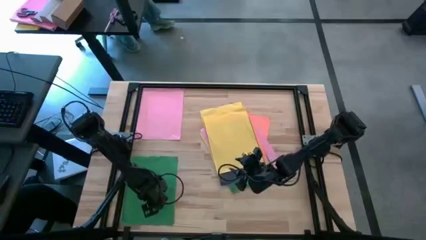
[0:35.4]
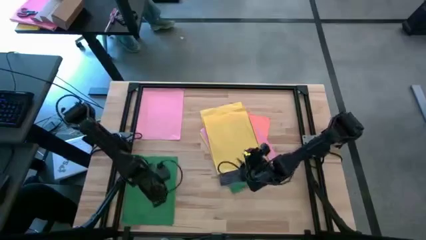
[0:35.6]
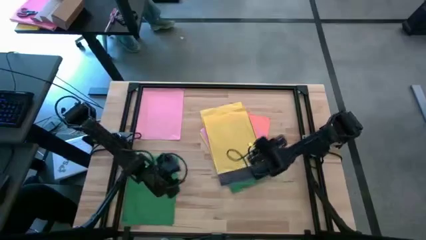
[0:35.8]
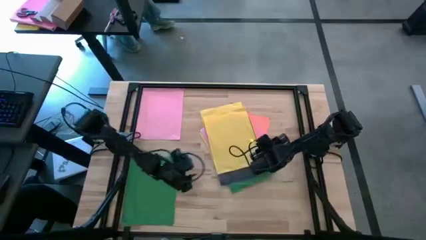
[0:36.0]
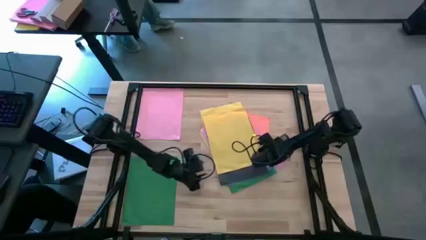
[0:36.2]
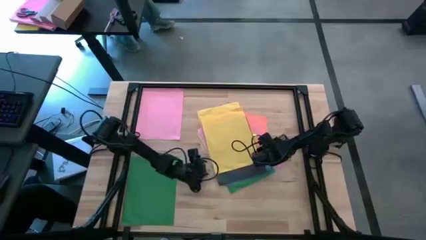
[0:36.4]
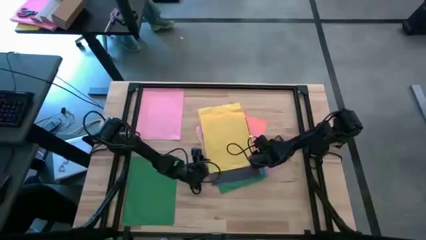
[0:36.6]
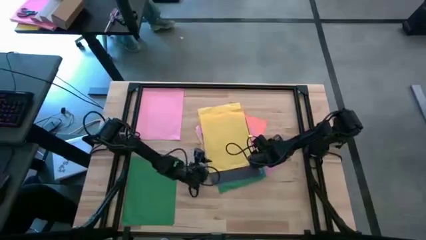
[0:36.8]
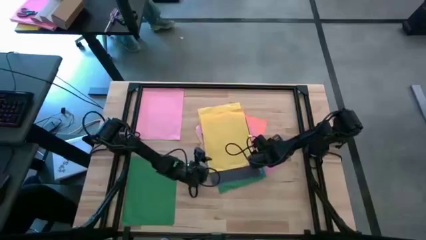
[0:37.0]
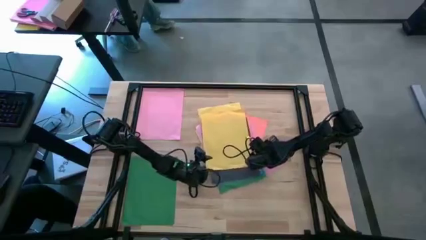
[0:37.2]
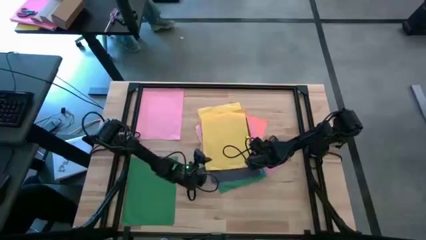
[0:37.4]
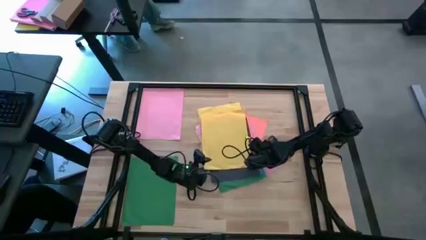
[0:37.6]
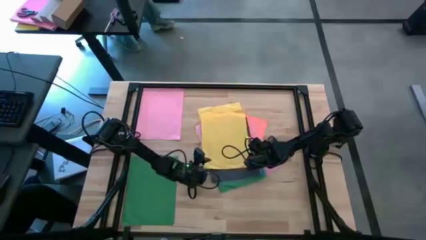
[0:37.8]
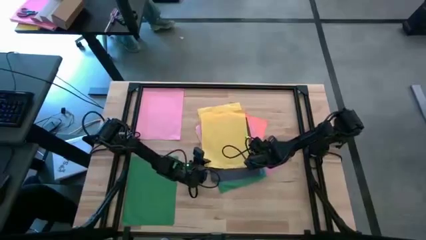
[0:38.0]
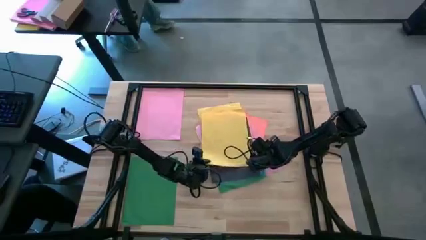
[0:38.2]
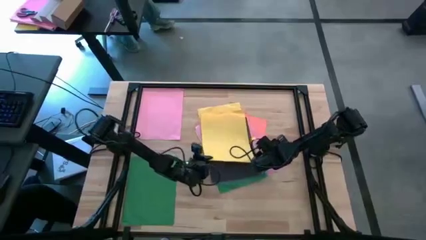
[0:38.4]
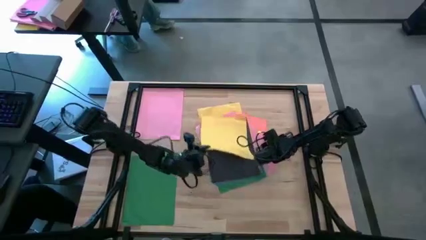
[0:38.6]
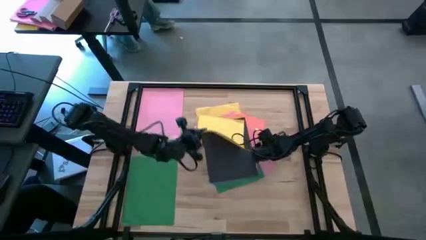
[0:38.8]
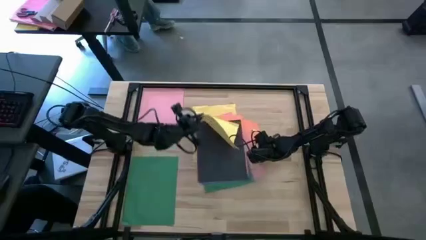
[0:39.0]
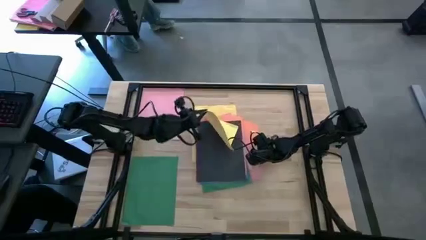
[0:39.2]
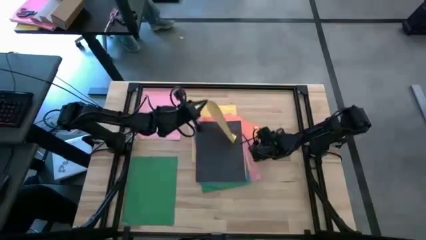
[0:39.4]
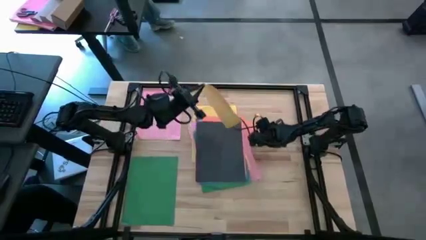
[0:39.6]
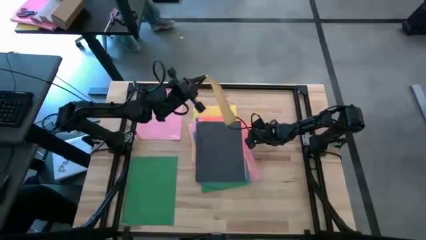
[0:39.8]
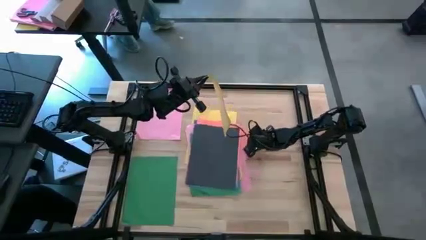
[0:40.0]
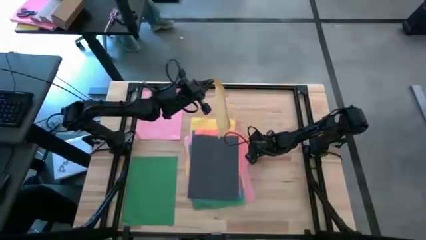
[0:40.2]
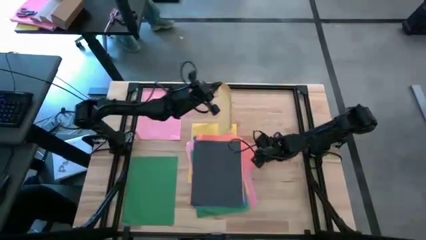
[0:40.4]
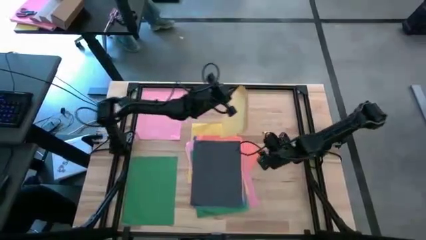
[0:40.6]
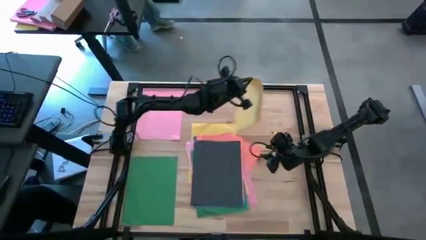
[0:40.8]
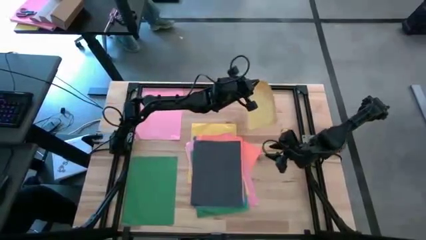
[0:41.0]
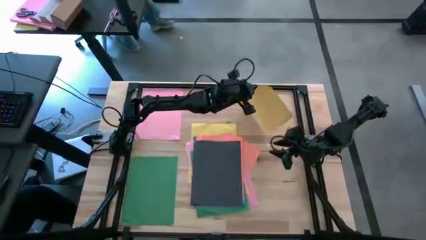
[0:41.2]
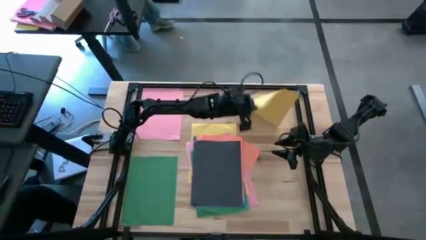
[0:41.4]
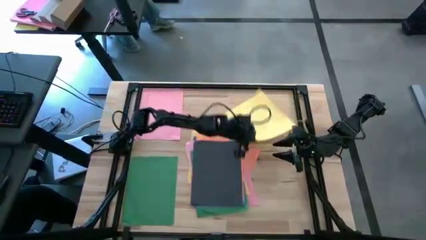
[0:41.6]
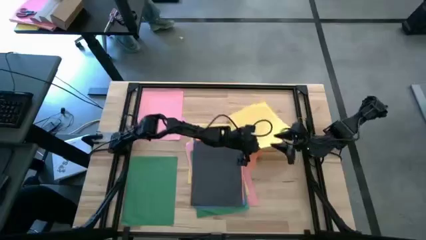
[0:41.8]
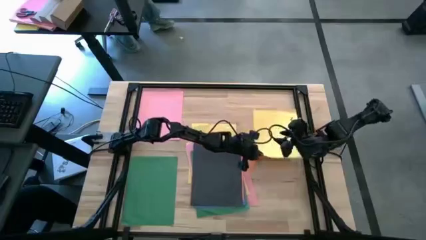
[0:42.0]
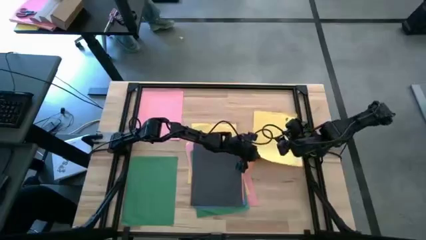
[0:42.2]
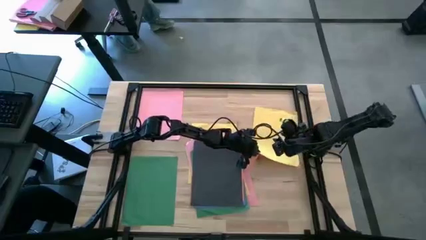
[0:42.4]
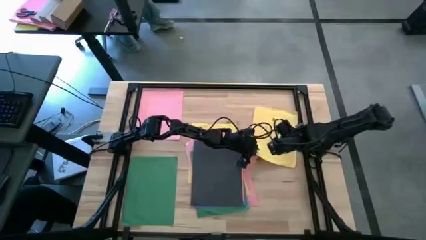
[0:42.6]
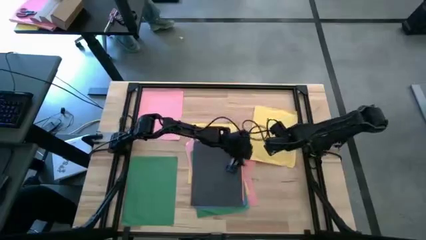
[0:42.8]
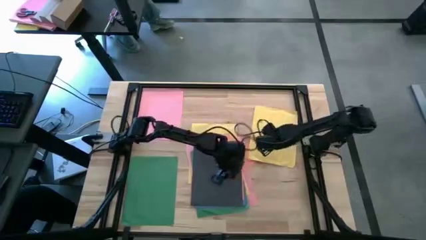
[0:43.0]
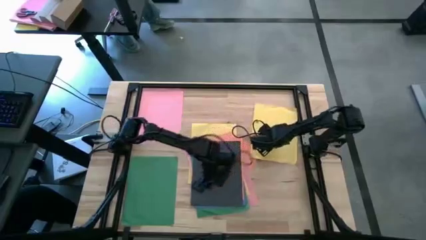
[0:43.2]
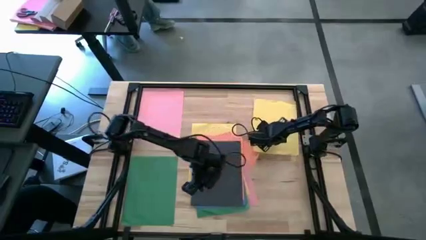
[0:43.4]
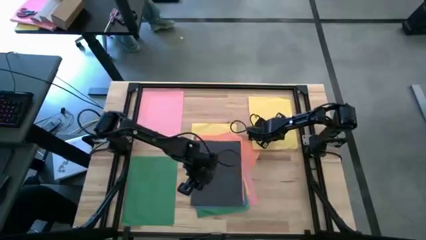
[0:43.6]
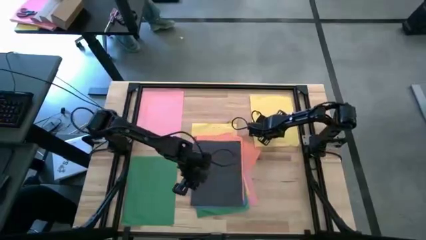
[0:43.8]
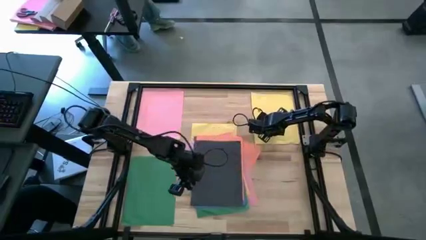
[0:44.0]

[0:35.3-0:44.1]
Task: Organize paper
Move the yellow color paper to the top right of the table

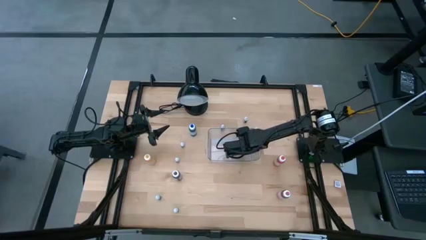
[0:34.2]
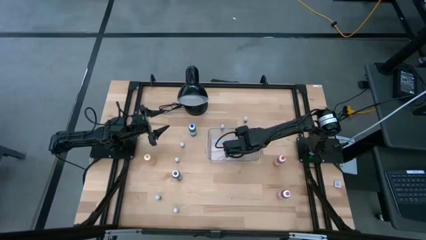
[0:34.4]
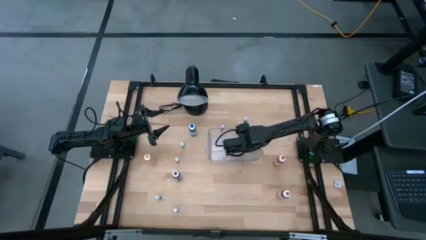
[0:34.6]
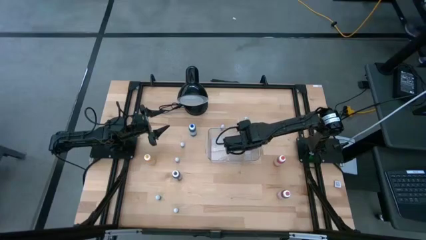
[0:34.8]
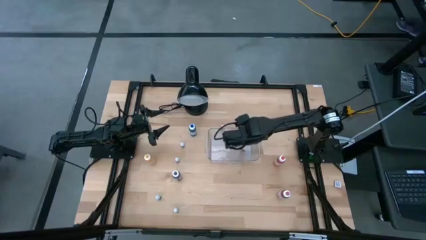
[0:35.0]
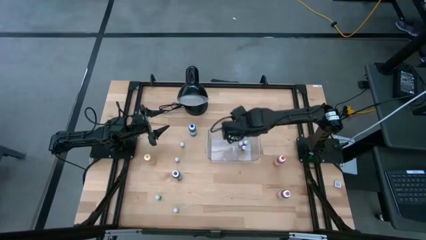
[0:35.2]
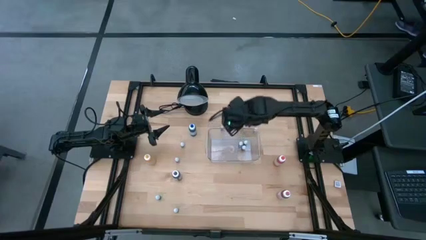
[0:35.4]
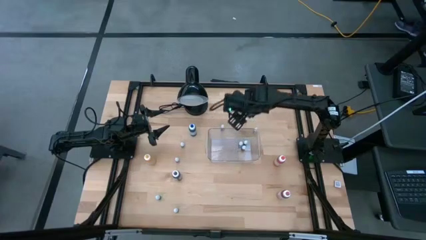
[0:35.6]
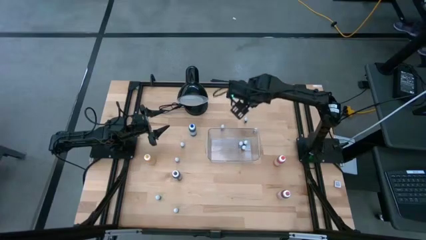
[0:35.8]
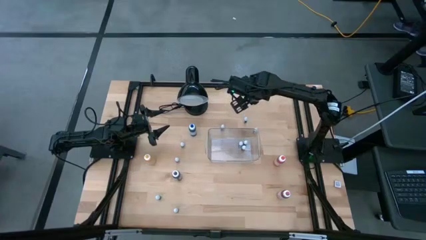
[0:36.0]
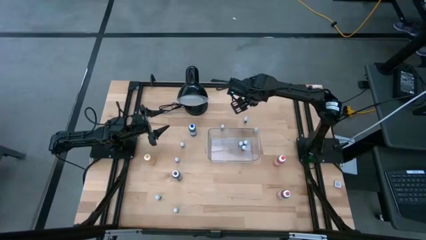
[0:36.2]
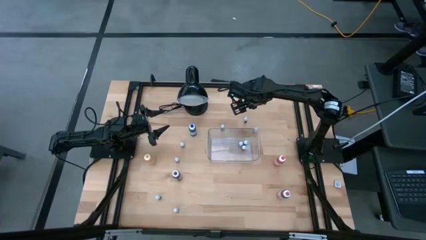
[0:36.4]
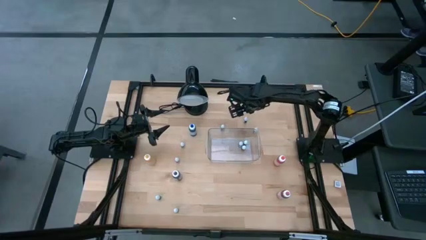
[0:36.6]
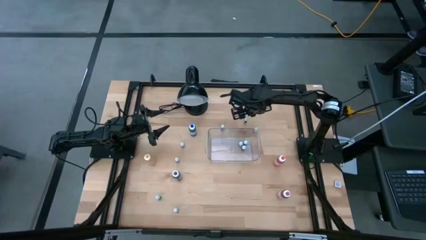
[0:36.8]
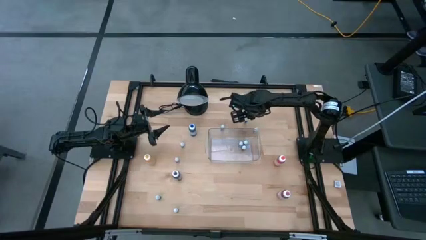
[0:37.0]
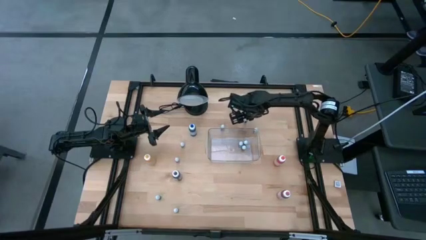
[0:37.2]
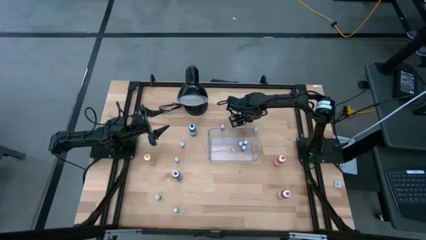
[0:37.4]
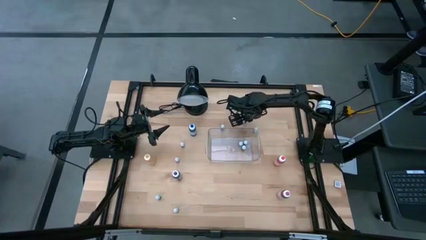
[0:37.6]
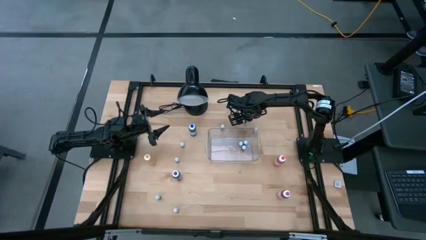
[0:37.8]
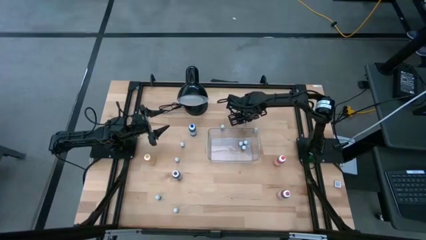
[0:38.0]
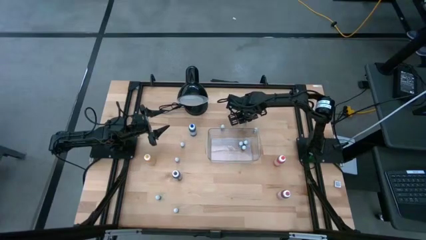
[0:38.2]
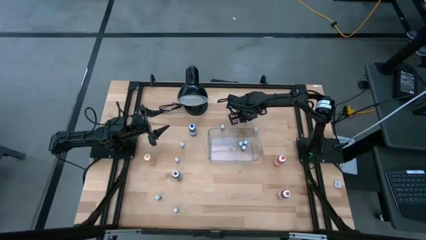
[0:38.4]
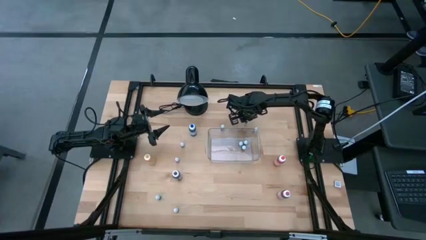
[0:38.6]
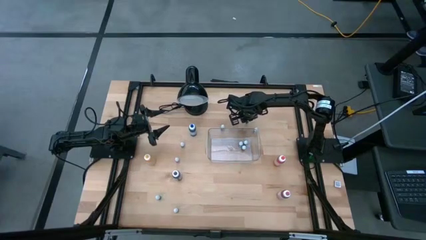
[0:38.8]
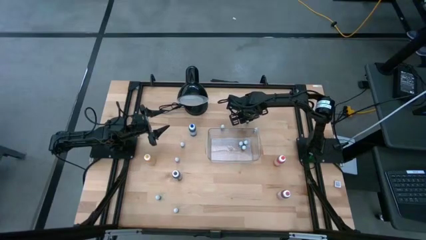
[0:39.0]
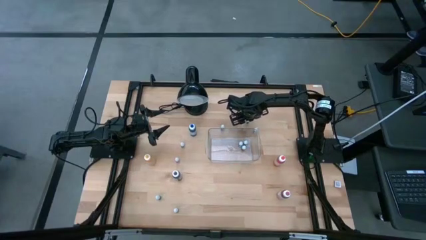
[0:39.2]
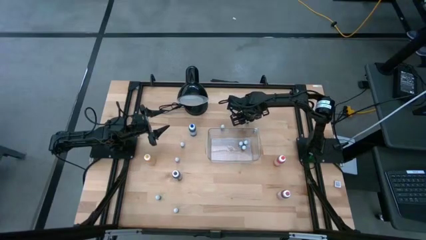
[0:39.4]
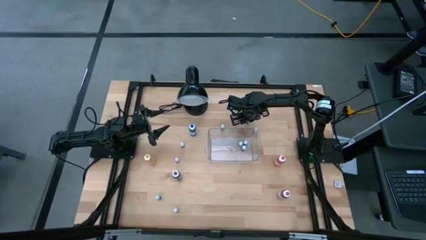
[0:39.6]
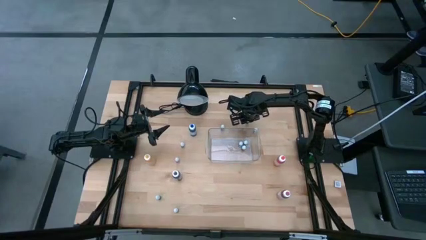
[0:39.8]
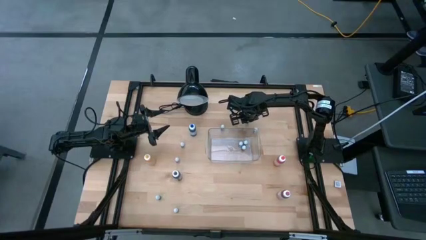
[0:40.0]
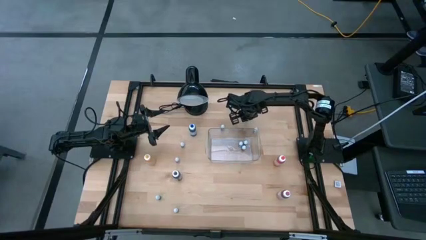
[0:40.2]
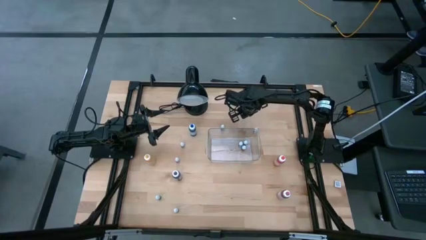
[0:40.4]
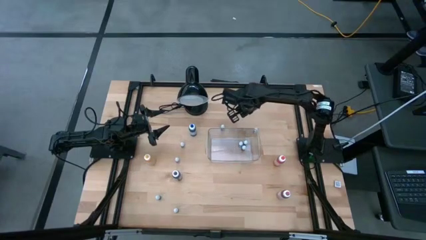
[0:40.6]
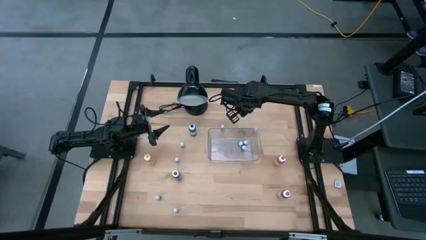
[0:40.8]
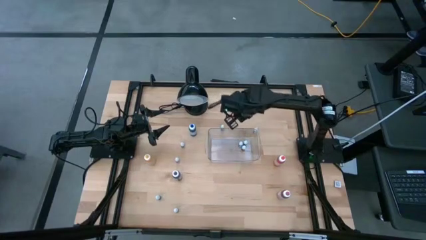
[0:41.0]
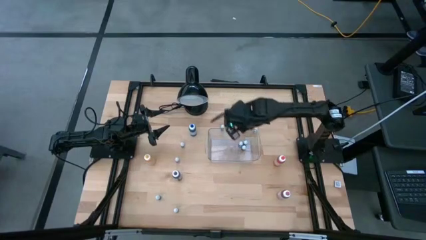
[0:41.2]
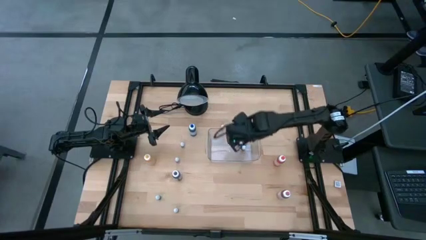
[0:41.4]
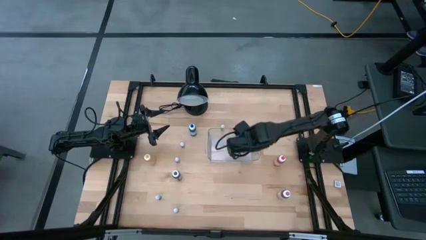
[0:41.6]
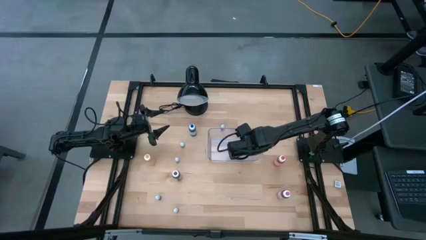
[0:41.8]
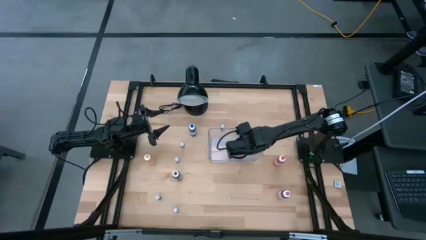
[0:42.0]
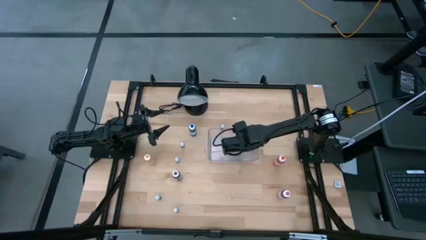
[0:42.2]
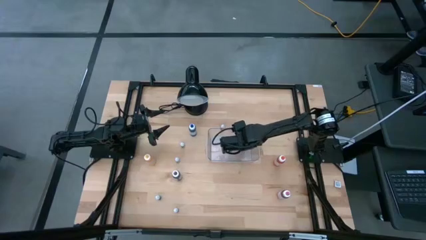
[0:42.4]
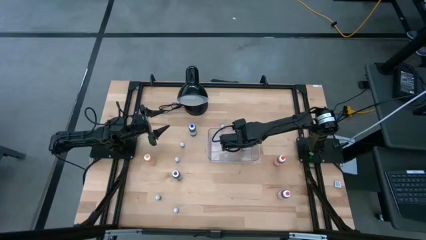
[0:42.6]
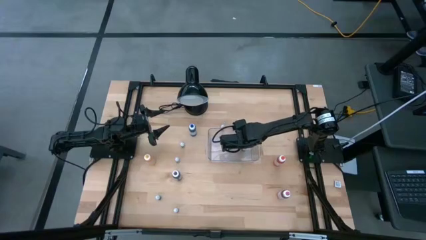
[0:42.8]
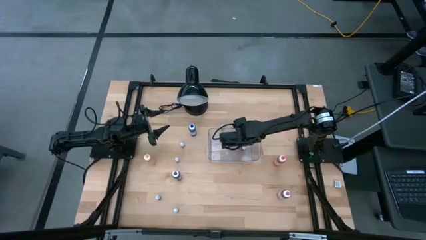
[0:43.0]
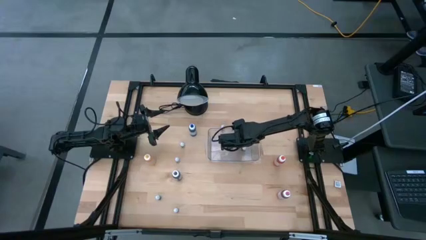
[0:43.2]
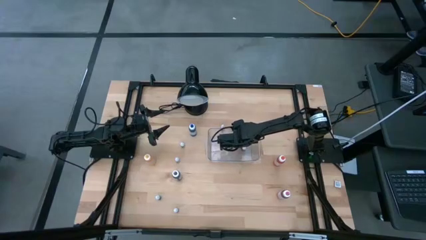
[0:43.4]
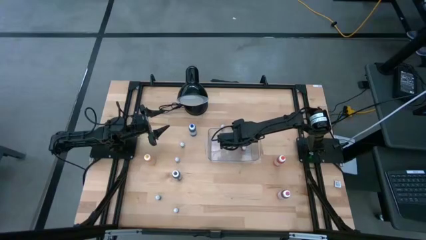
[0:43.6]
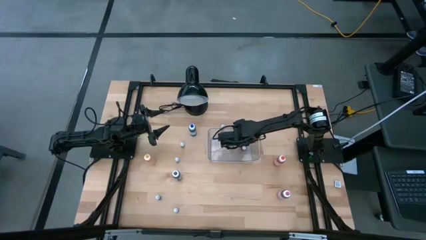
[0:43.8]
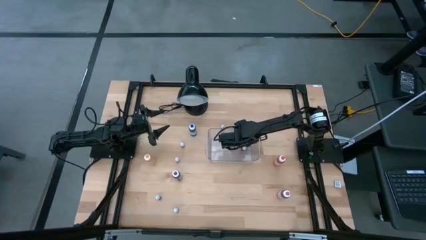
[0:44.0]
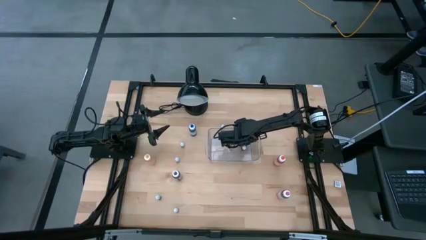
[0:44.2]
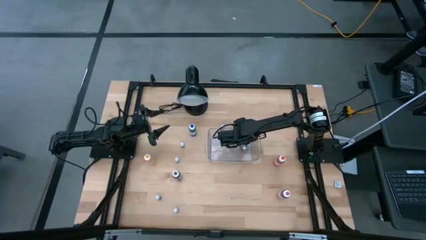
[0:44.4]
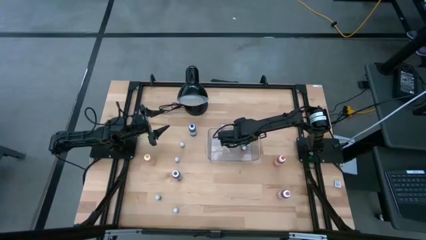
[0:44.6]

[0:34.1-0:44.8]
Task: Pick & Place food coloring
Put the small purple food coloring bottle into the transparent bin
